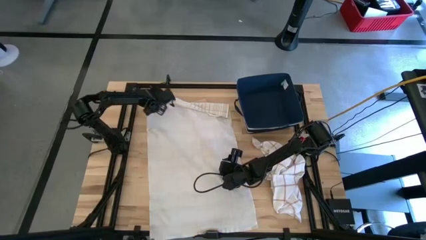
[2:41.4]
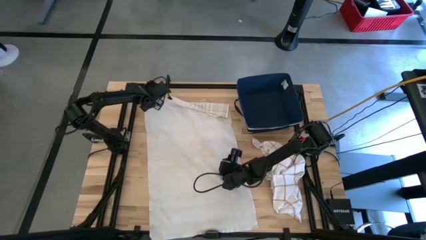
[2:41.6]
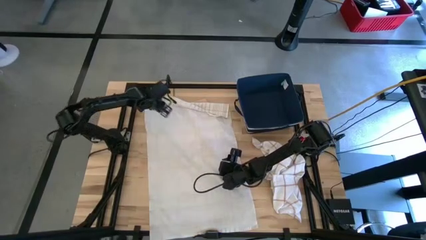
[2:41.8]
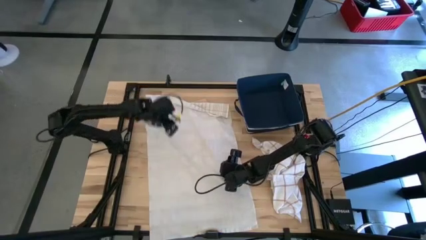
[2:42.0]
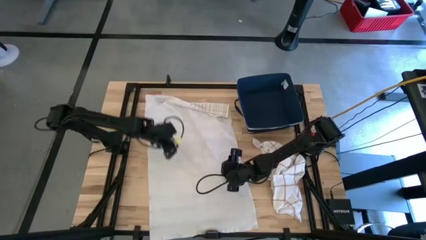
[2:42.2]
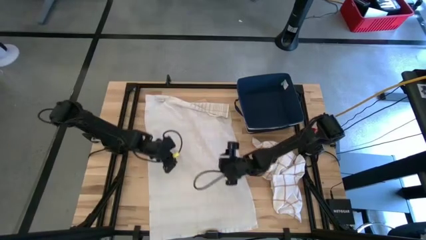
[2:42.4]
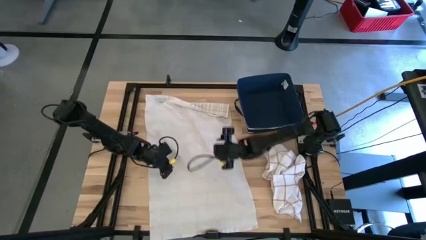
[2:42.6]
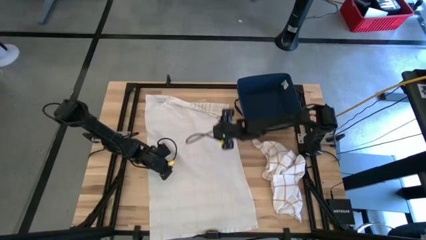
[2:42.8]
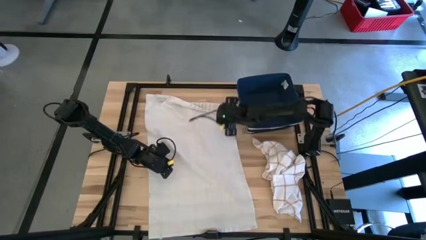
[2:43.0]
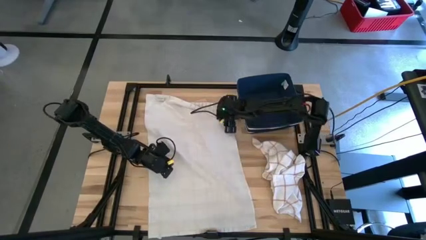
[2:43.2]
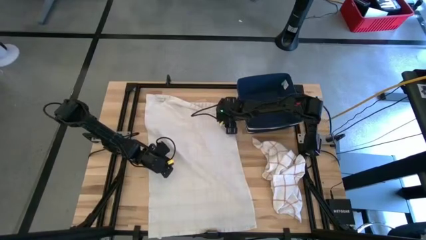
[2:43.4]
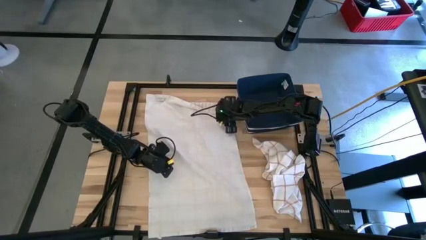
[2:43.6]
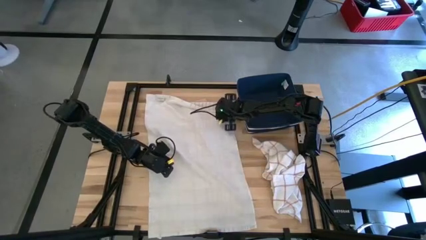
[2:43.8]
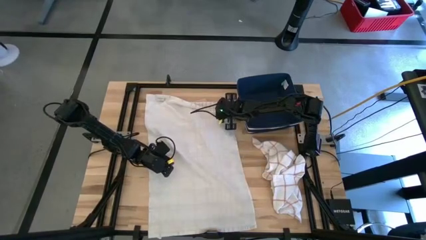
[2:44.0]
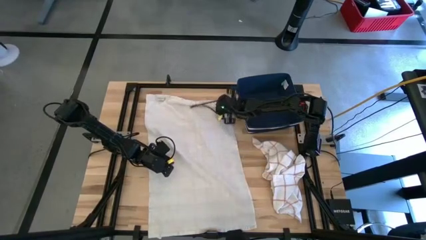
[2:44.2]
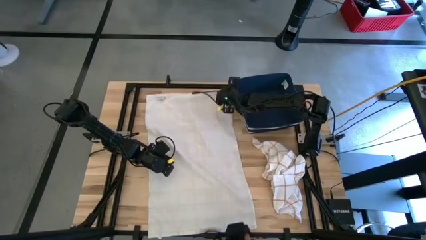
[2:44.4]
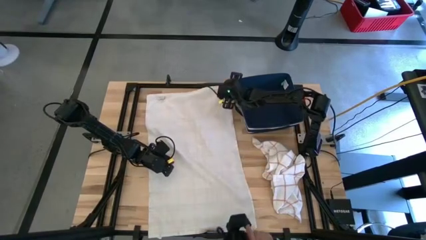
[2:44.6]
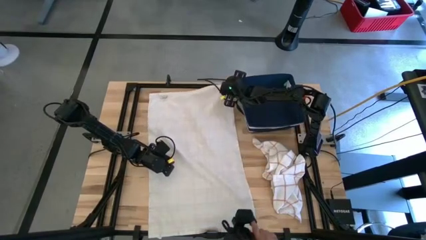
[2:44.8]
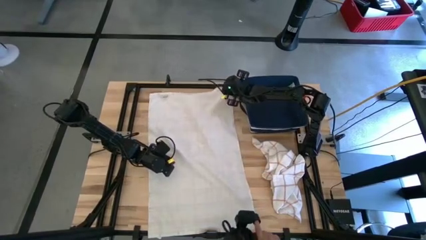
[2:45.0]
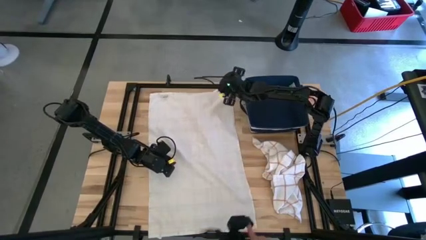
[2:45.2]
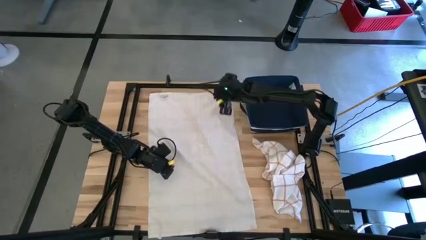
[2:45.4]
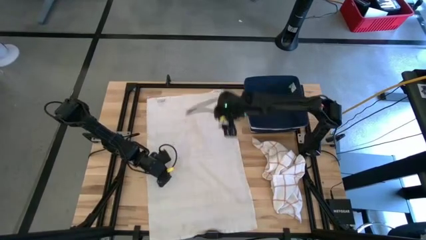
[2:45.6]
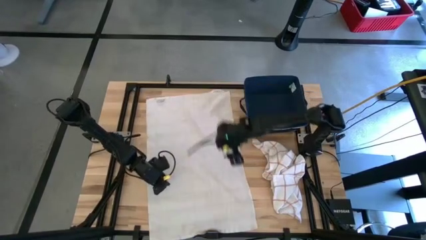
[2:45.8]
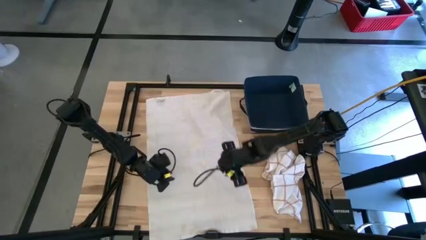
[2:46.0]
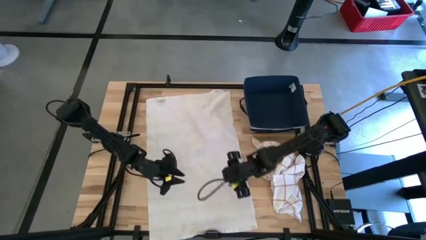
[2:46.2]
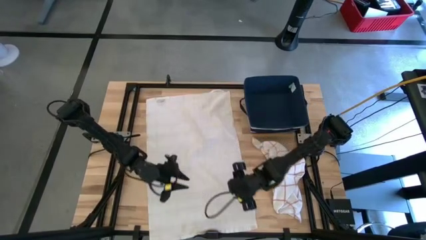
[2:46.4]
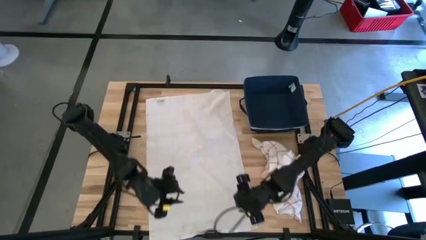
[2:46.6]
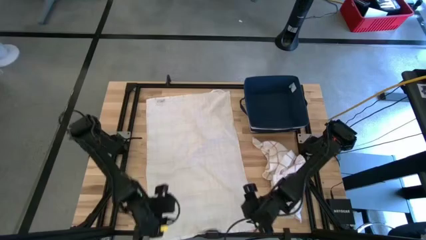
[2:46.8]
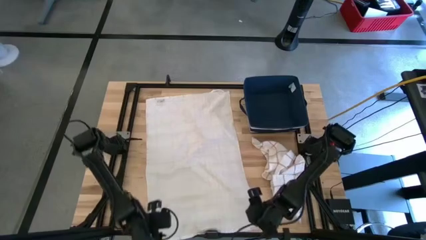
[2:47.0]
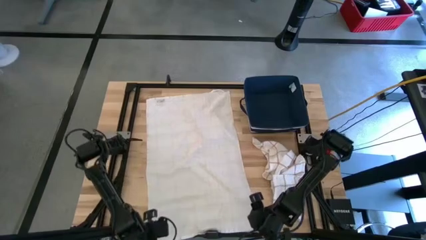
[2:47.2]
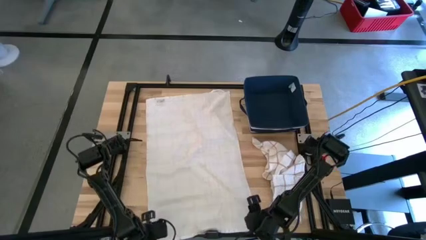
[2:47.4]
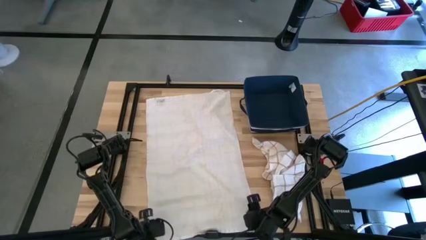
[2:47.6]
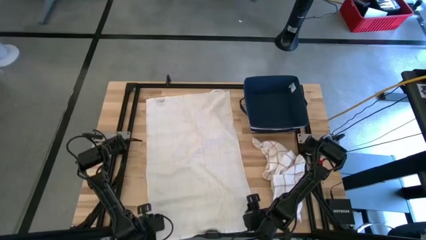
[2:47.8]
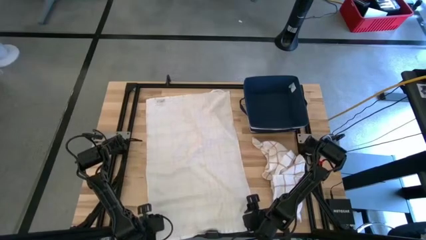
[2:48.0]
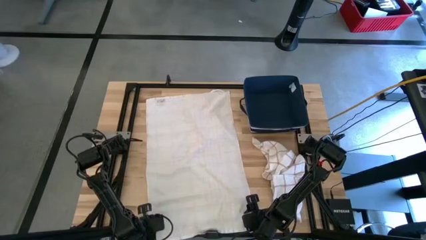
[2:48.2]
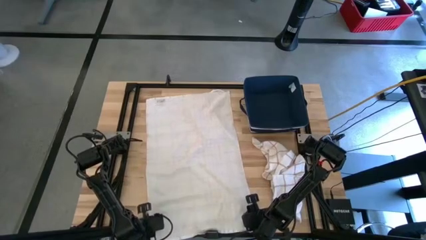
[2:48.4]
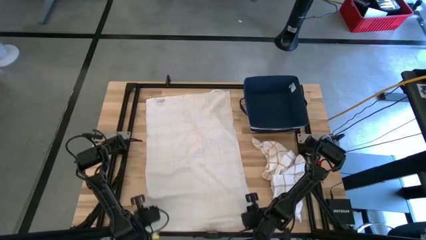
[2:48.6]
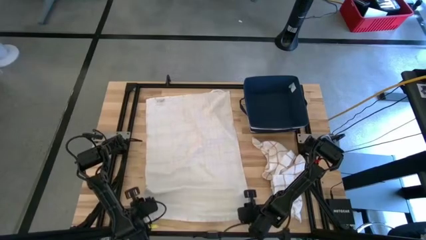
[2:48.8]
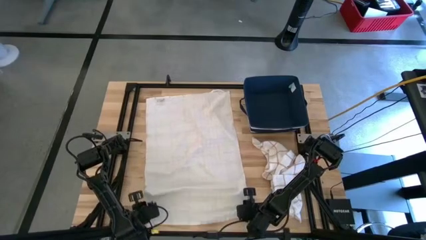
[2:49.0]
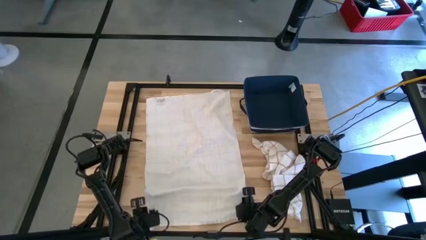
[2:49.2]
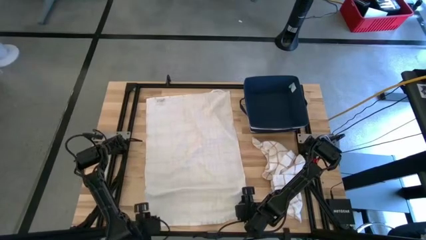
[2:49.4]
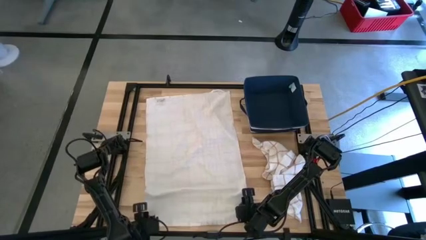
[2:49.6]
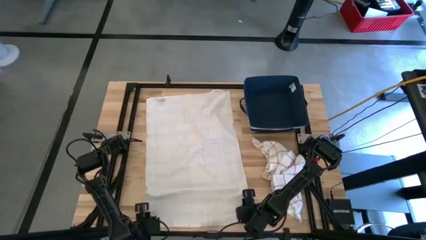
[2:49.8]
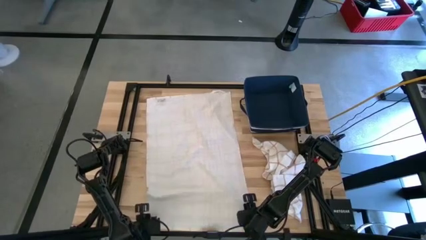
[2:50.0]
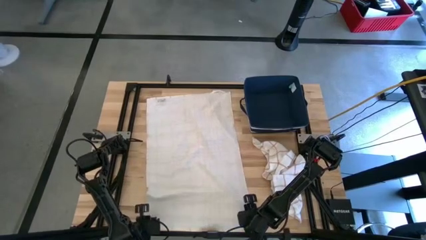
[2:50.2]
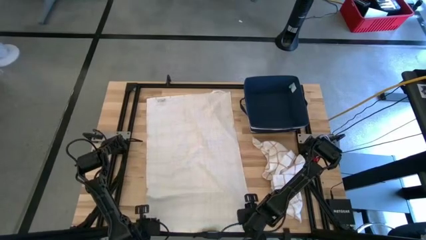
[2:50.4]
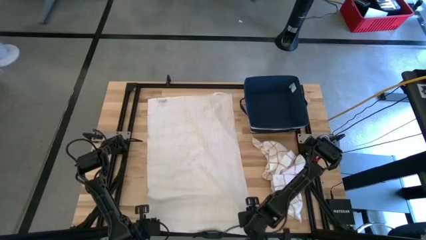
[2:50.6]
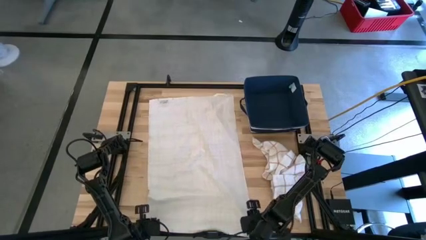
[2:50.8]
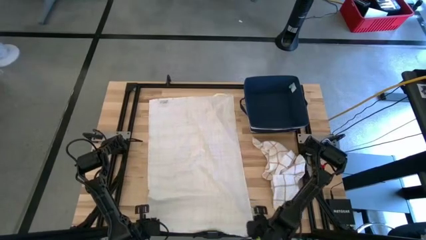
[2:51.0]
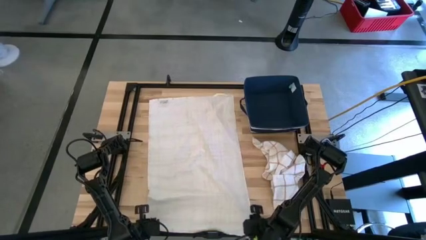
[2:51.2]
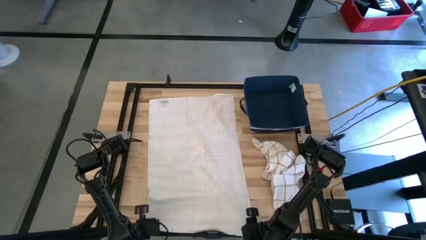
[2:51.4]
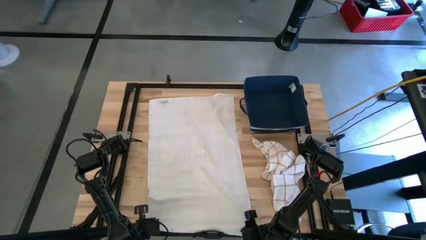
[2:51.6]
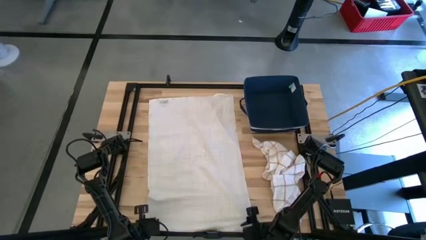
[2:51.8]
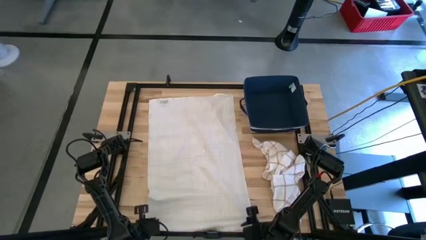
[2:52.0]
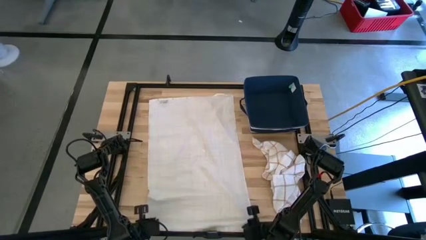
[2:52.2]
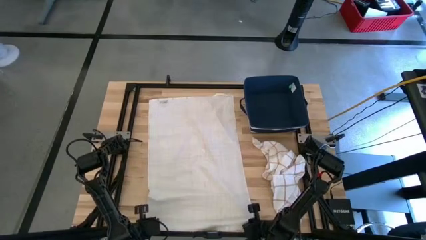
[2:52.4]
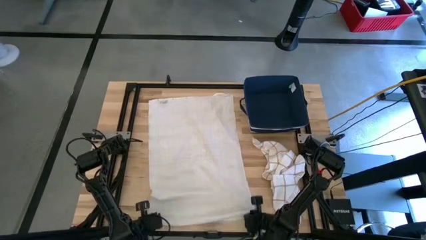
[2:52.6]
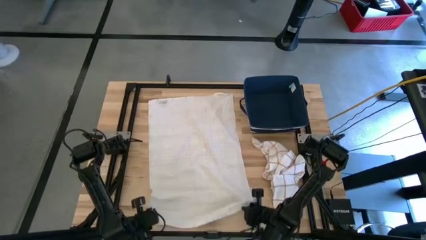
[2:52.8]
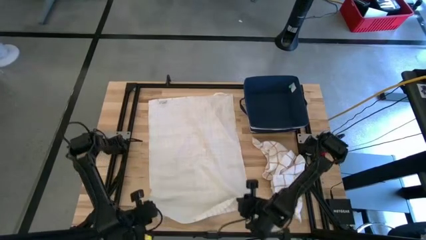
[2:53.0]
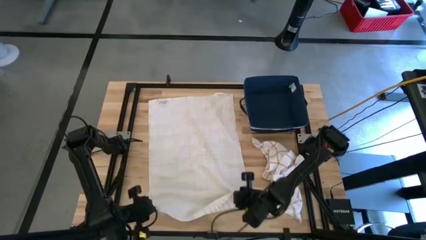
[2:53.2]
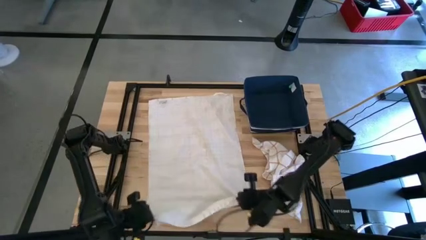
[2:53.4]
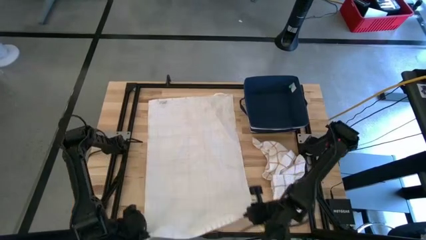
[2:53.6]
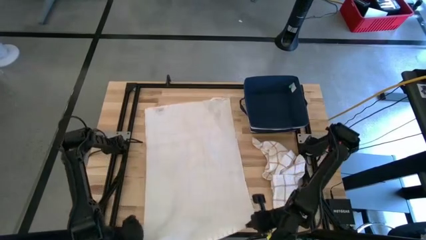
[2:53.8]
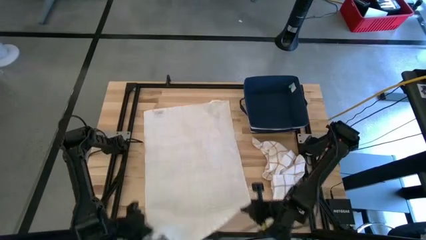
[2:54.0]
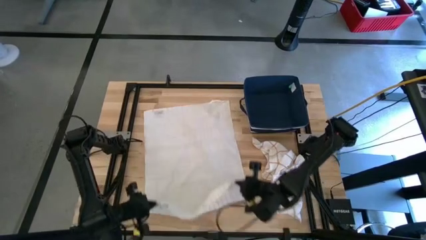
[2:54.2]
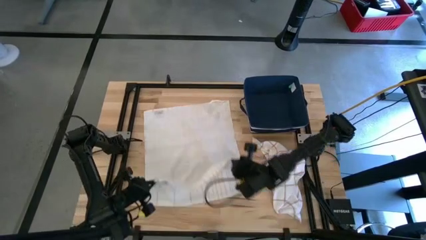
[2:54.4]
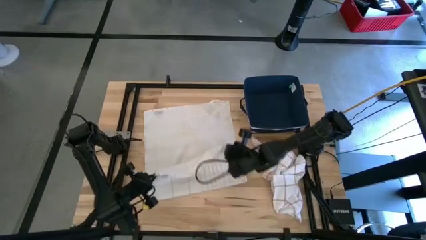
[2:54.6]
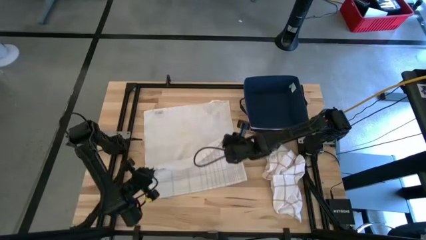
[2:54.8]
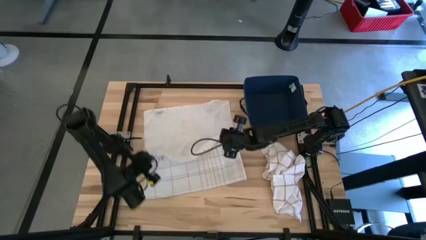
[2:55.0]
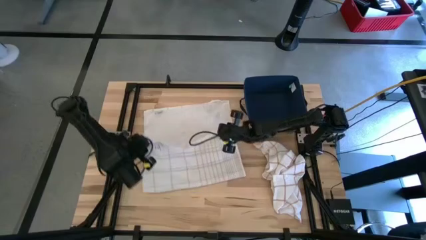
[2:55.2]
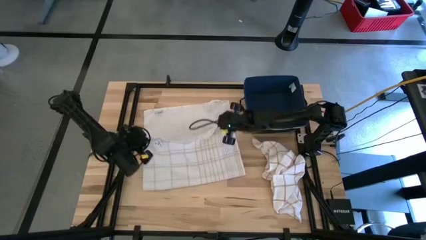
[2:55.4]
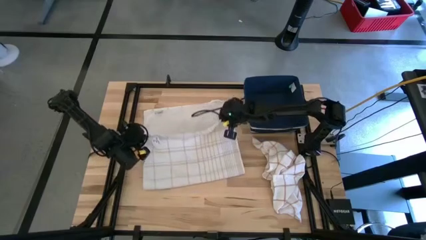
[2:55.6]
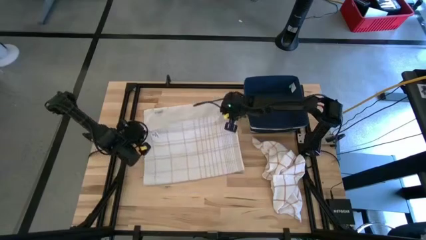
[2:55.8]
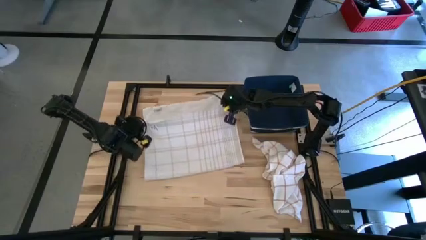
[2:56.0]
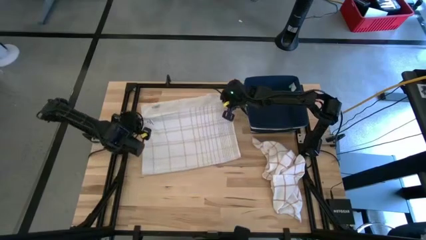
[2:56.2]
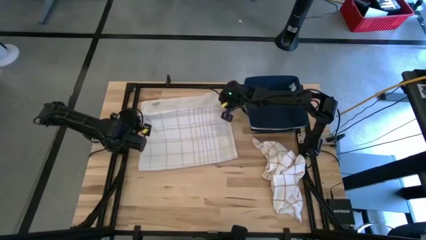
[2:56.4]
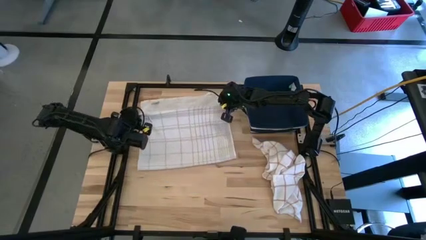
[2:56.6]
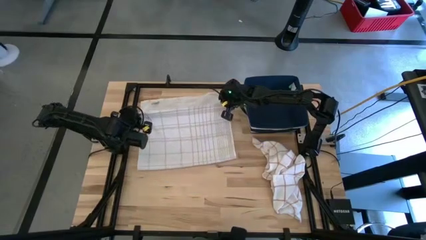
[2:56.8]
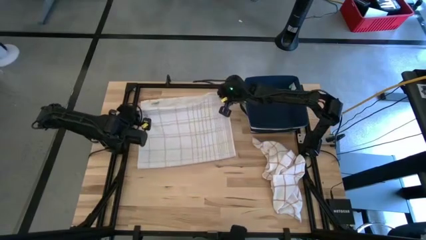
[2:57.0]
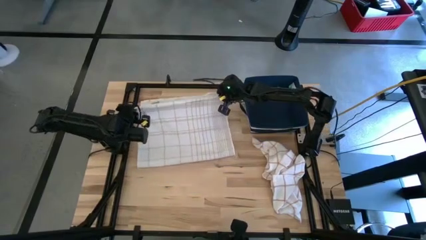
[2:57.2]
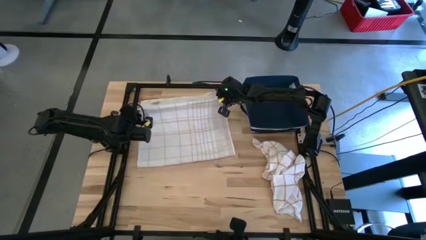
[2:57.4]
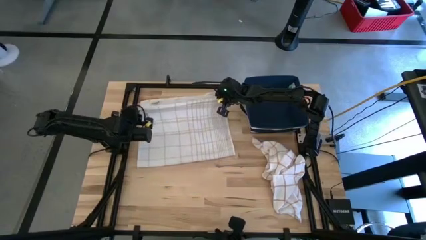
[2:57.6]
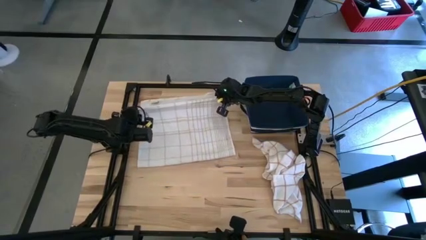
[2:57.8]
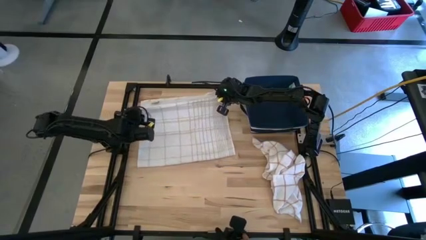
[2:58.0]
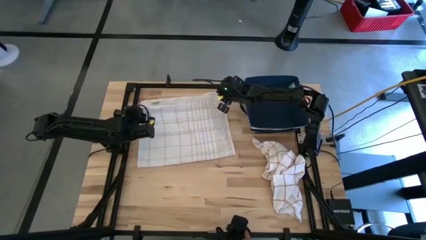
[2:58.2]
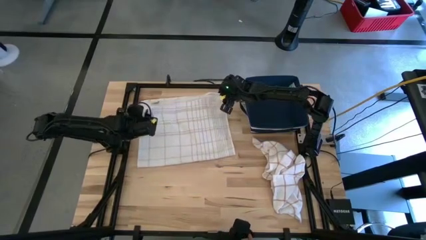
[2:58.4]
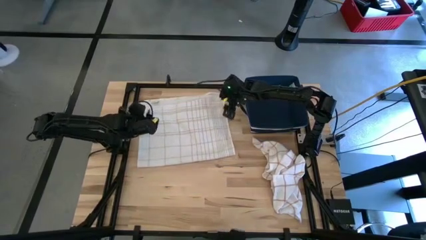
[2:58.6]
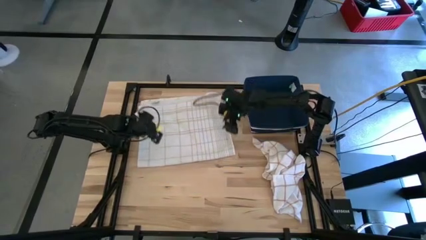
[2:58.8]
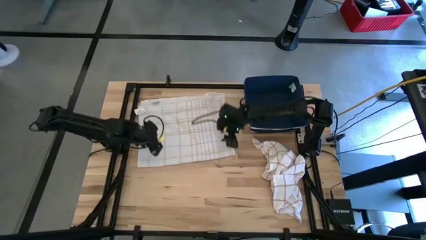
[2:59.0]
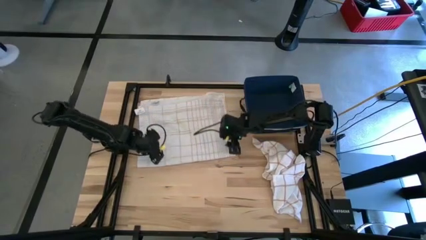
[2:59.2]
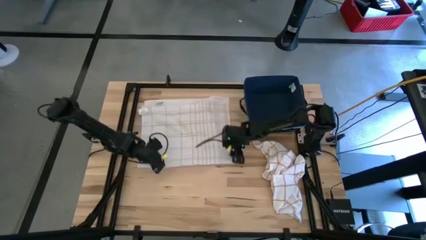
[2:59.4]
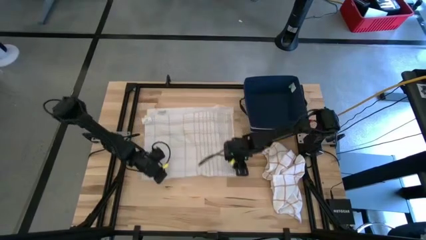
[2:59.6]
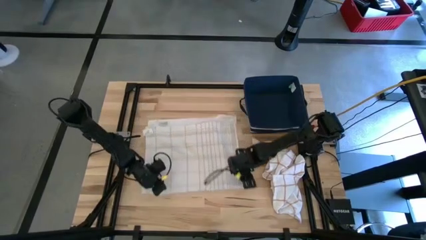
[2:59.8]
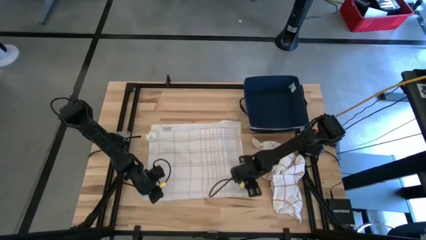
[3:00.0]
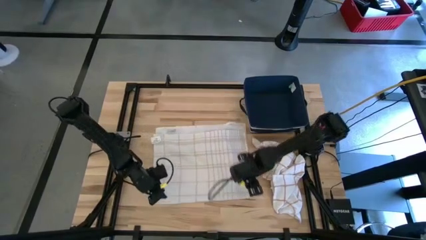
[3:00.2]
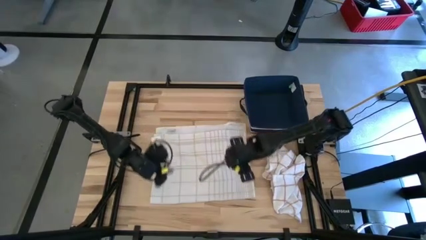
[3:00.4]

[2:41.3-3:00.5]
Task: Fold towel
Fold the white patterned towel
